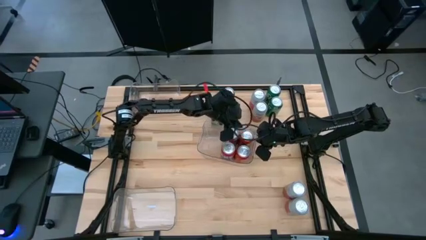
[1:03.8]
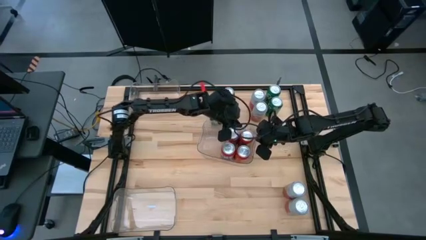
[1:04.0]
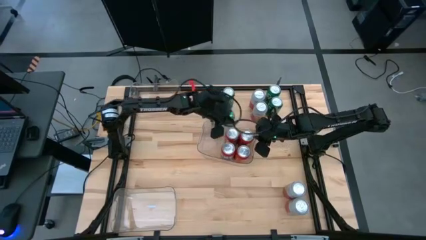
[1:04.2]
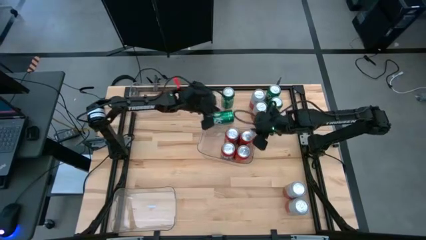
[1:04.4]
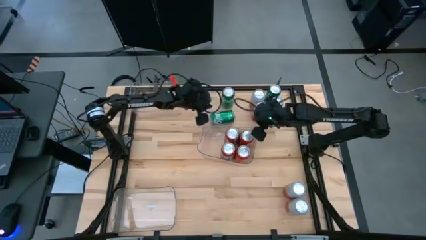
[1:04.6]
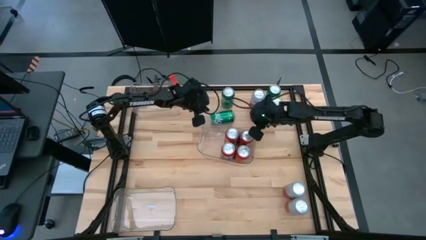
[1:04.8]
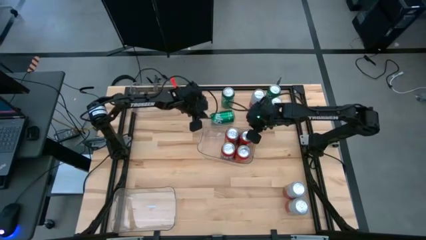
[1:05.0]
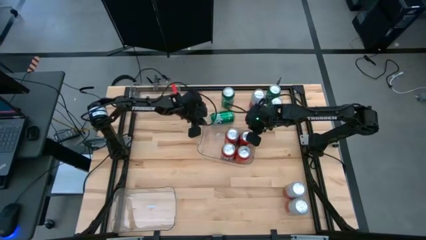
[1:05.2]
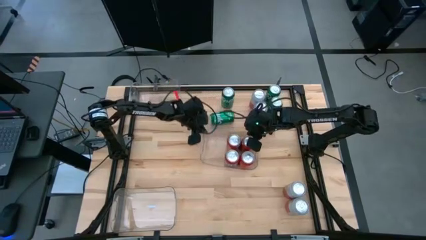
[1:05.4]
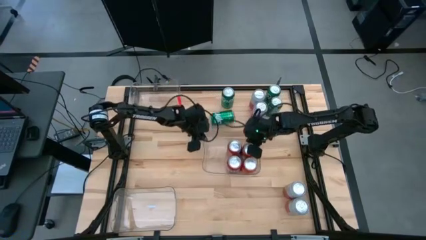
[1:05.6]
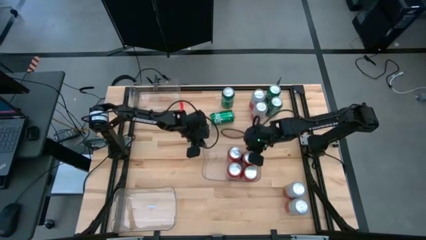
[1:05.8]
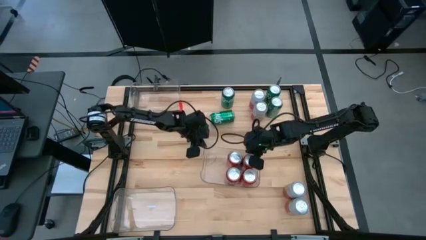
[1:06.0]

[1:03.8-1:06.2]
Task: Sort soda cans
Adjust the middle transparent bin

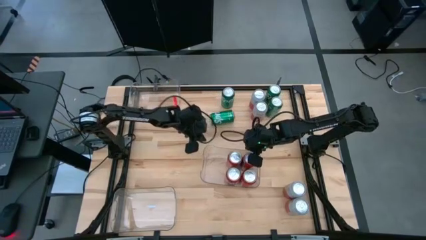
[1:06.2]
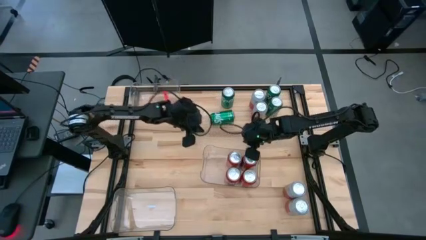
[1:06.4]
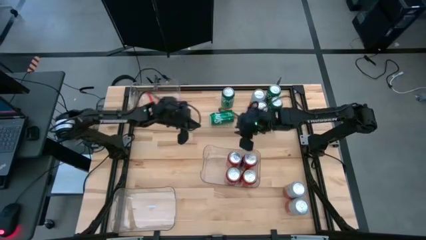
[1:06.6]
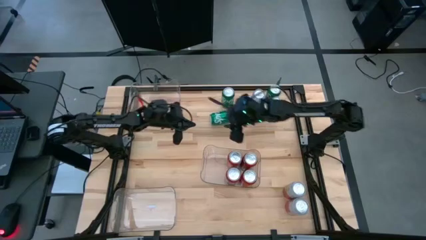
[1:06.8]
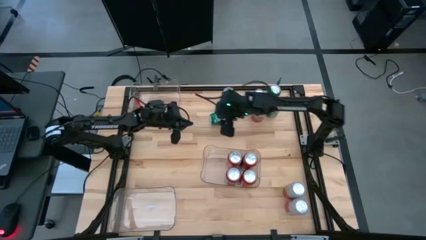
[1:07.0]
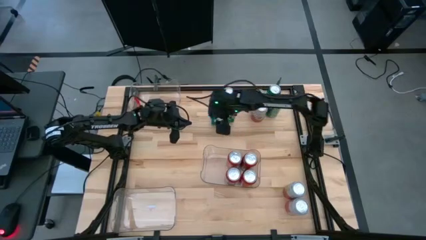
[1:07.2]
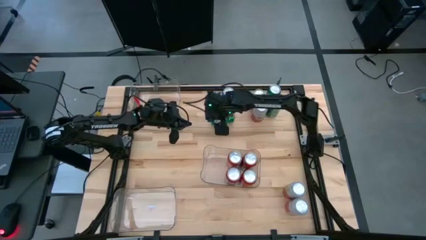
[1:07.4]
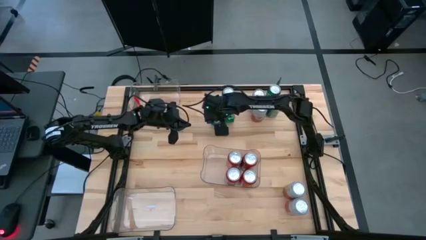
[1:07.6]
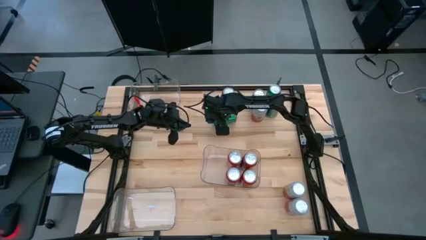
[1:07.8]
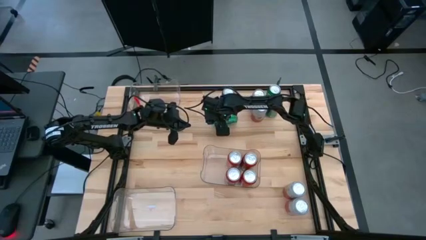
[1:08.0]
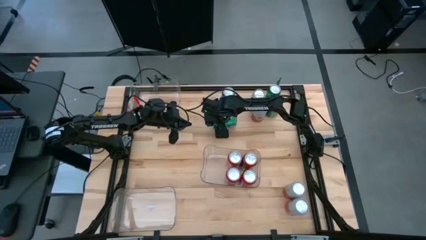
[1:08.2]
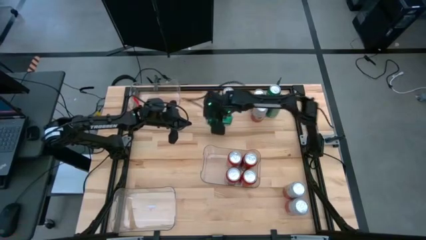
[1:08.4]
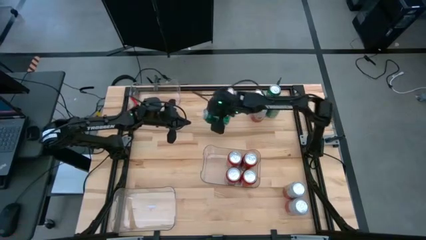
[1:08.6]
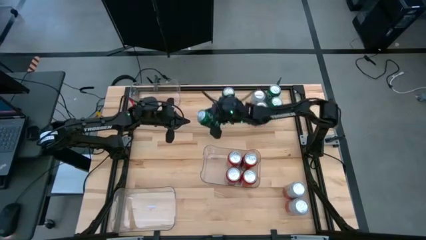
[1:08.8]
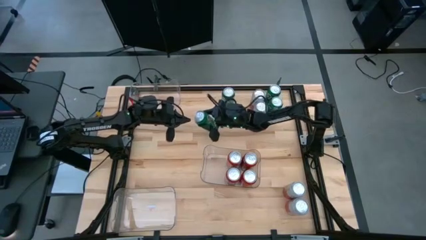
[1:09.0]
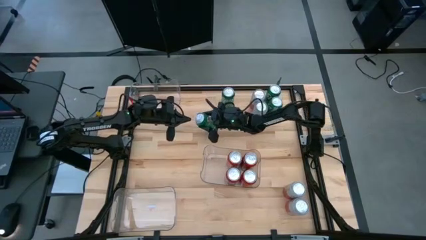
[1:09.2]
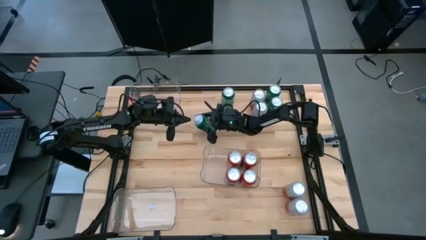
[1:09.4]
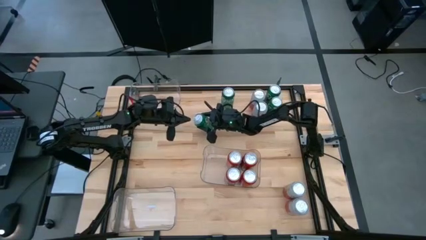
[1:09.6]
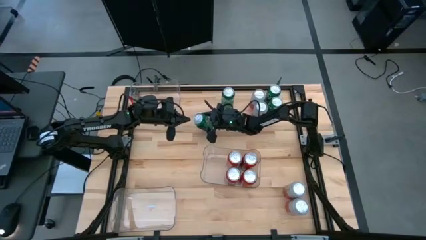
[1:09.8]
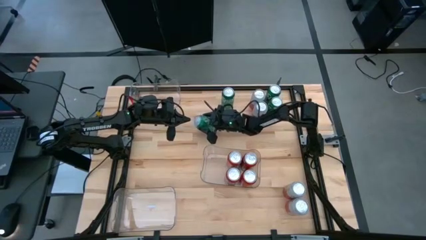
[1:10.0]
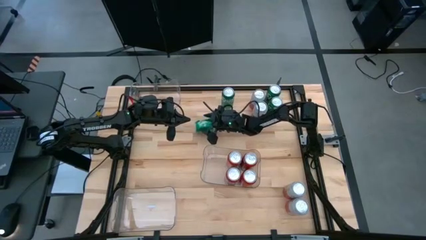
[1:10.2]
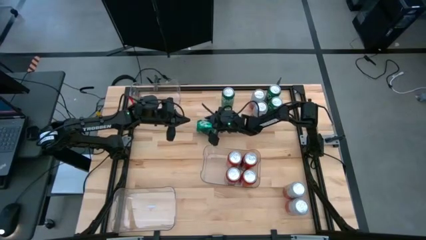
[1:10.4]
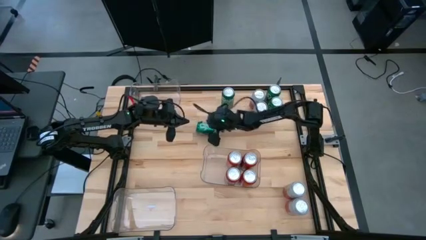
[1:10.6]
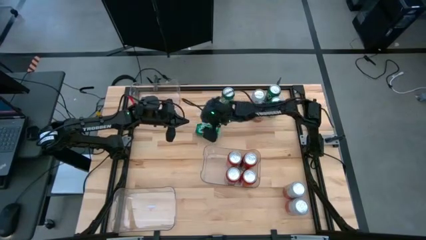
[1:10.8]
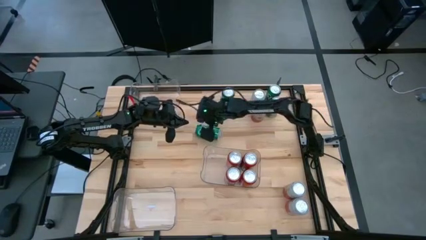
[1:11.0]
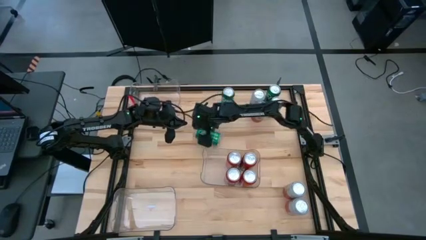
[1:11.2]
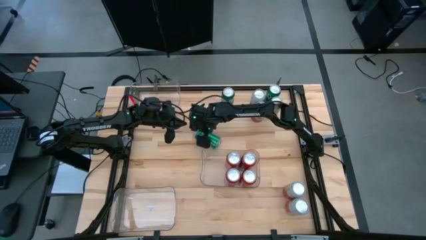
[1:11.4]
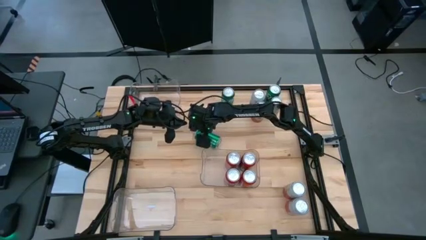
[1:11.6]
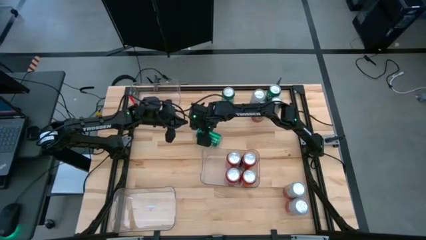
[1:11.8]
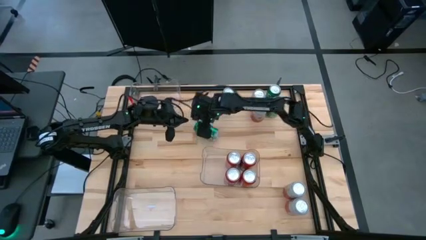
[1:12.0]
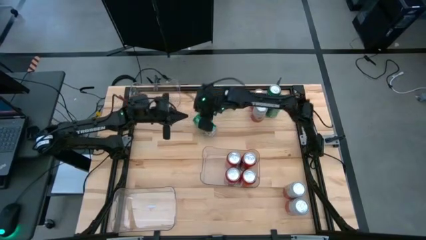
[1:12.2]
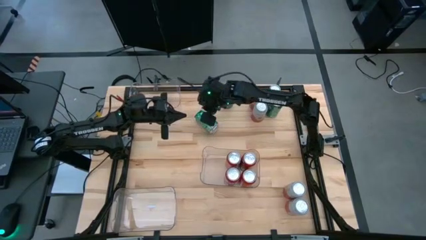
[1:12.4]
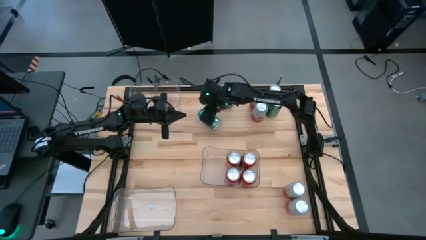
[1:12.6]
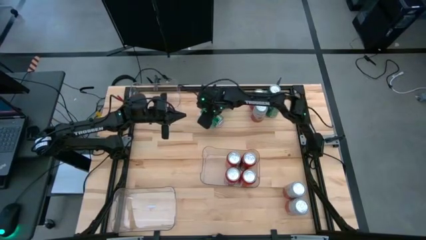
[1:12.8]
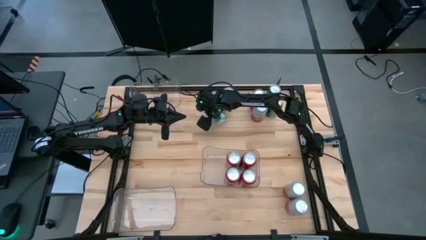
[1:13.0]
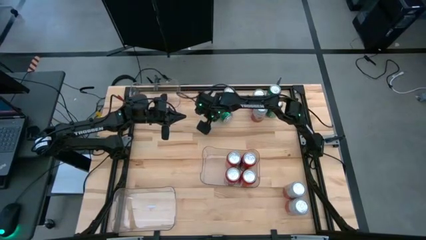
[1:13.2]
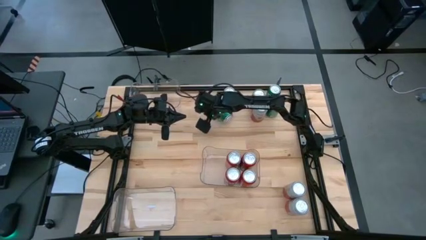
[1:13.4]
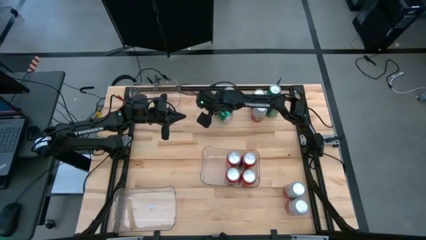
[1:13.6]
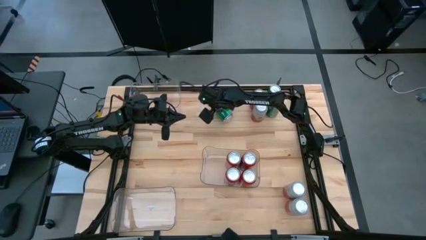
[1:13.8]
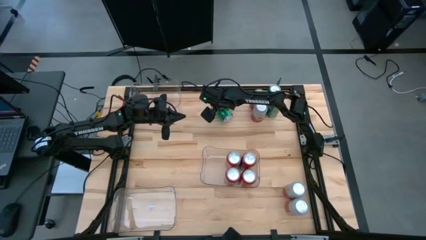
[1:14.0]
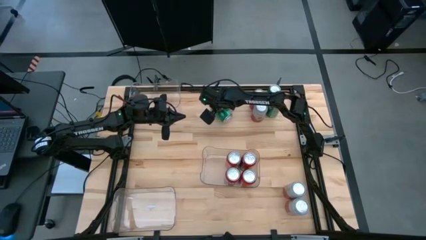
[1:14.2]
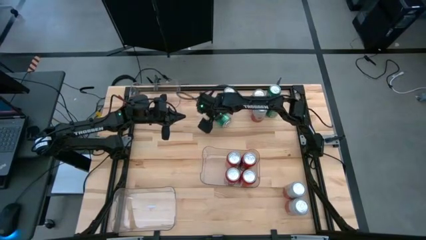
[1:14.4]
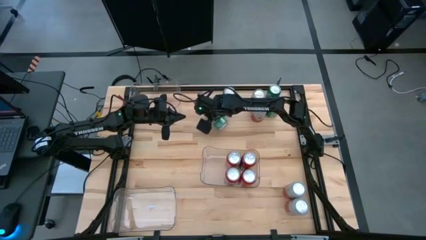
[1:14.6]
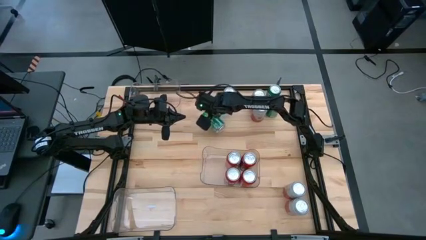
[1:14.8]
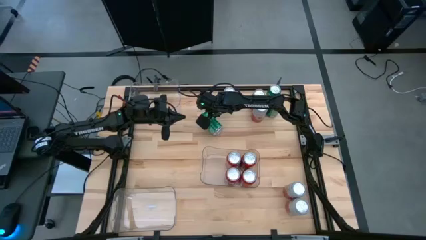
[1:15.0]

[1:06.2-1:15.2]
Put the sprite soda can into the top left transparent bin

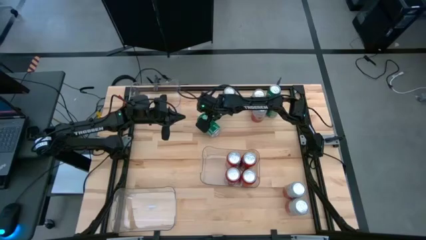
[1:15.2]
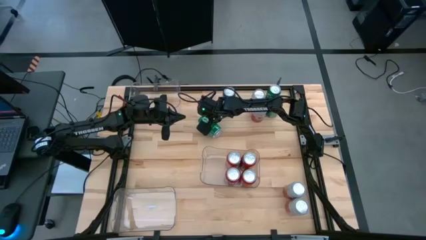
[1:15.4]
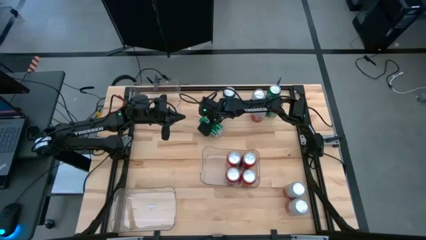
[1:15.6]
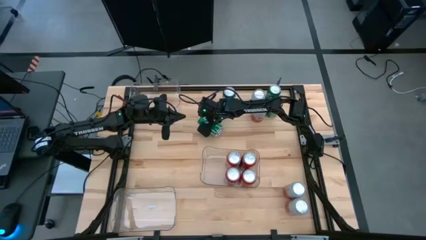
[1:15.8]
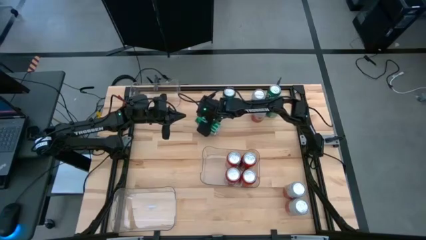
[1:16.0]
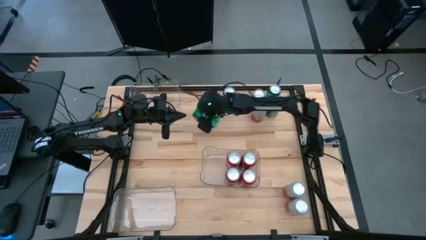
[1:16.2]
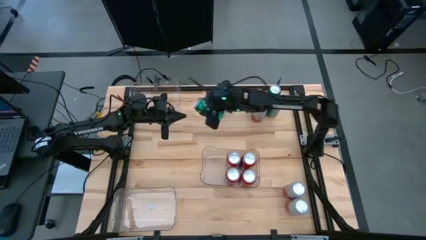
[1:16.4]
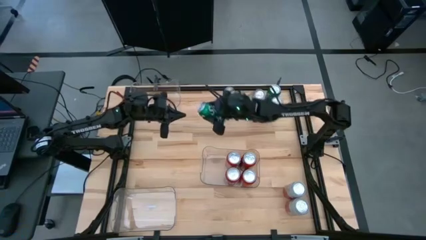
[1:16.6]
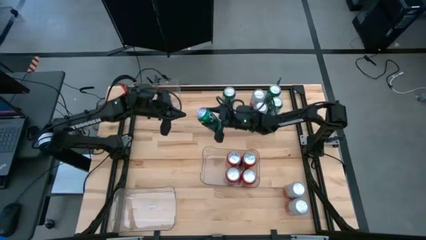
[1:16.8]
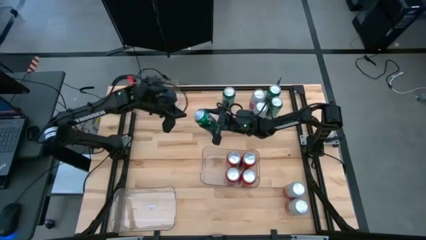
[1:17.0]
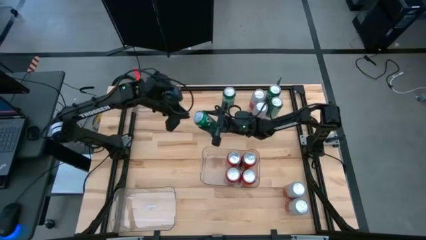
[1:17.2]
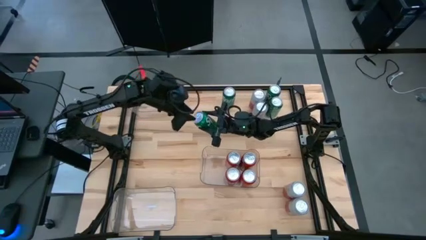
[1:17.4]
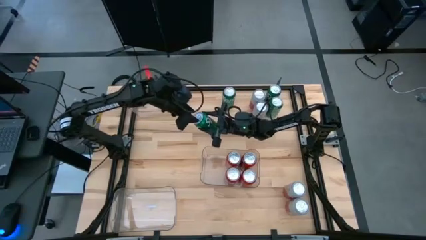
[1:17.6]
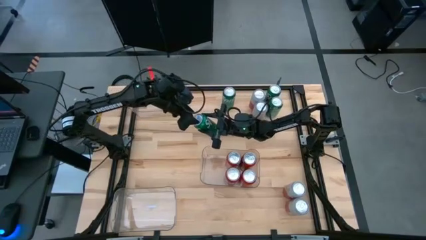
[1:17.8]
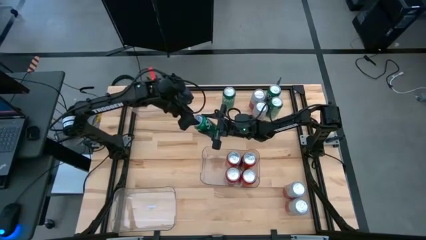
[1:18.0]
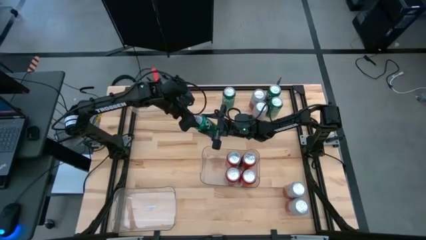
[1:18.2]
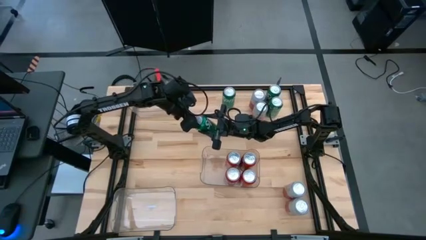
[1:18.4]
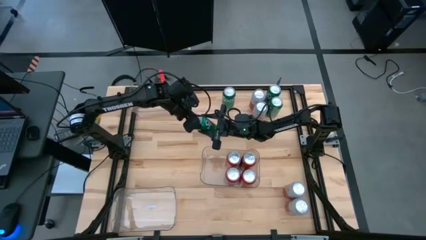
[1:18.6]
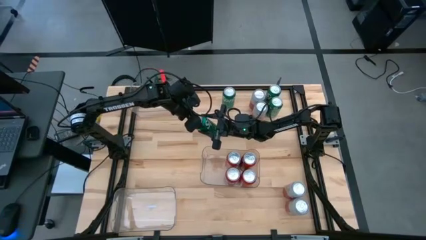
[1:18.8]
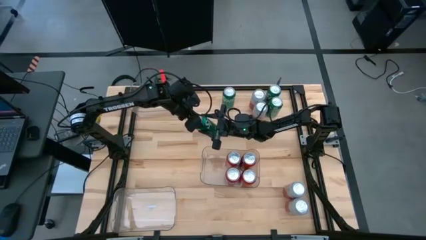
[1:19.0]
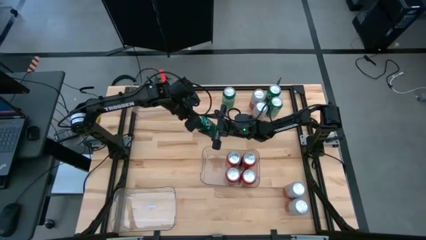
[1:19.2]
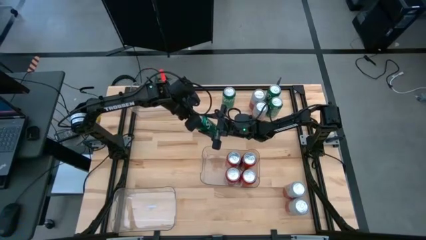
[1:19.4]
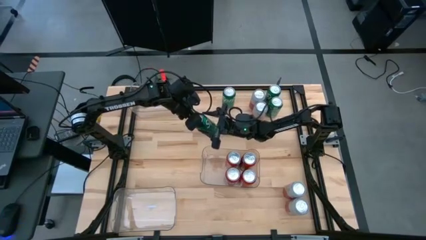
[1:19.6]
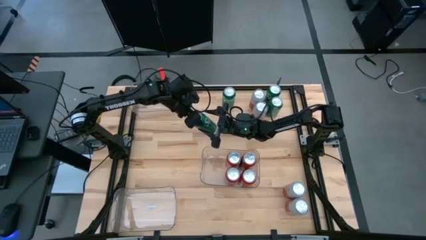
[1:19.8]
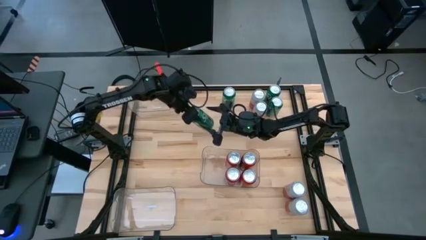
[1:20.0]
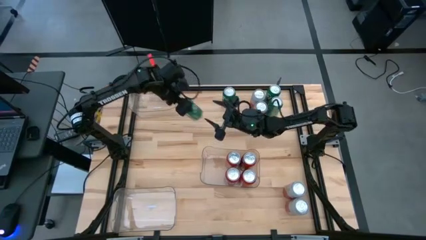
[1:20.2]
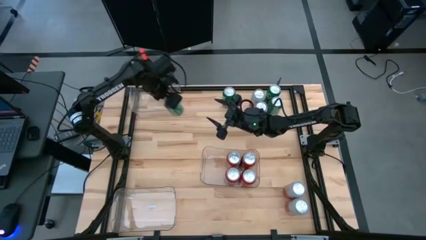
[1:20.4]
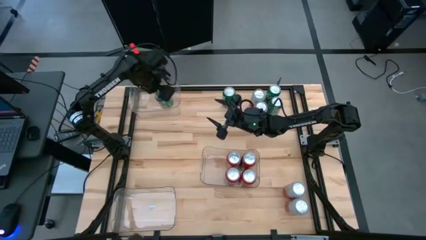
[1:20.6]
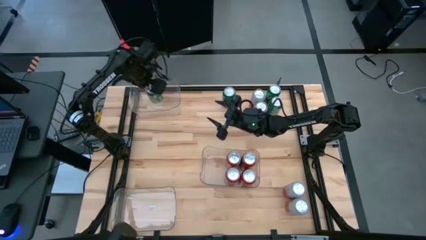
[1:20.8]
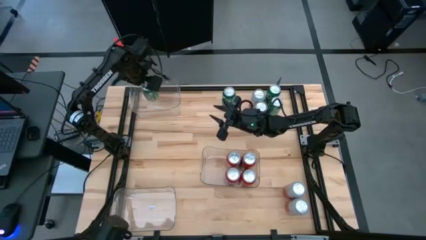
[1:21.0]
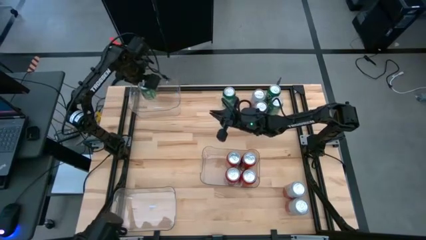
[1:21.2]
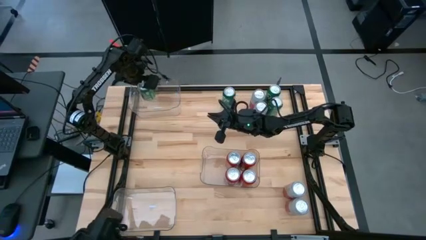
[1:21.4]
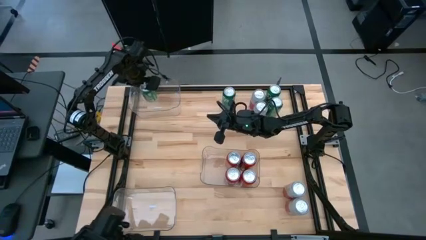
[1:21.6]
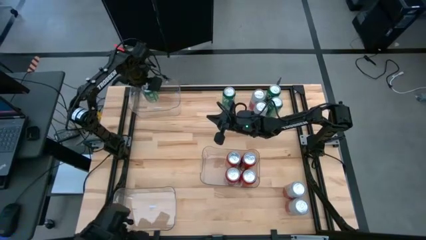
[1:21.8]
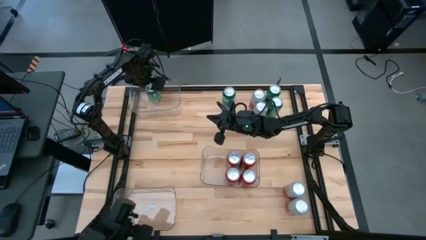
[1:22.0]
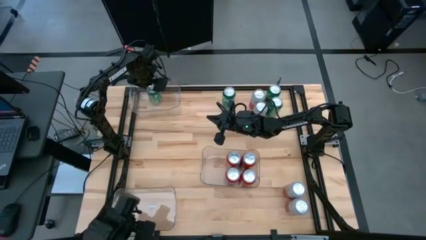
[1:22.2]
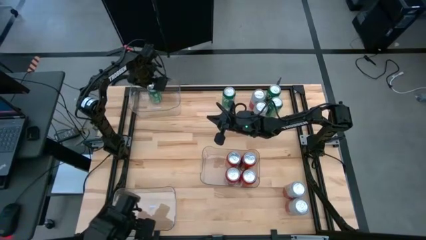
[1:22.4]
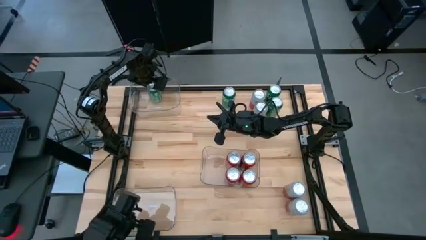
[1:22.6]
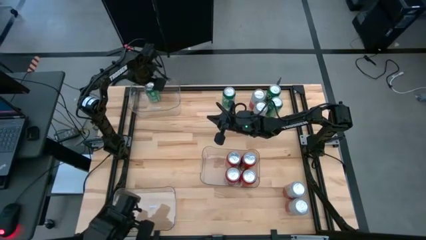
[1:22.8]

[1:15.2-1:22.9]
Put the sprite soda can into the top left transparent bin
